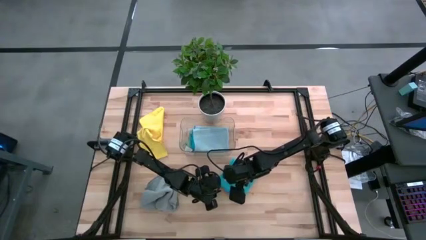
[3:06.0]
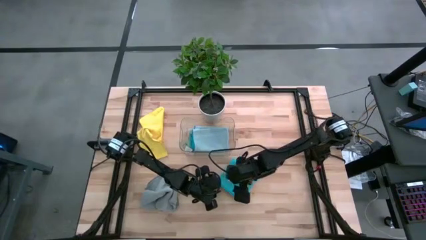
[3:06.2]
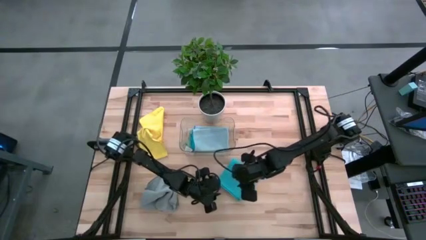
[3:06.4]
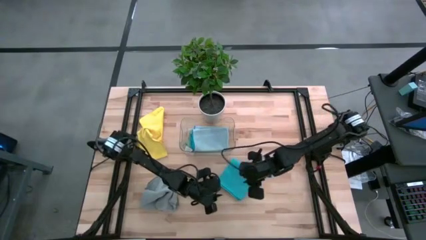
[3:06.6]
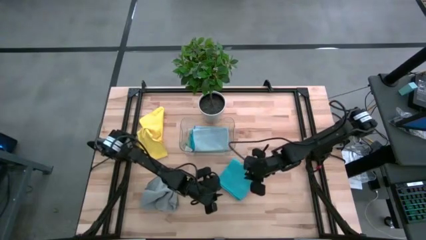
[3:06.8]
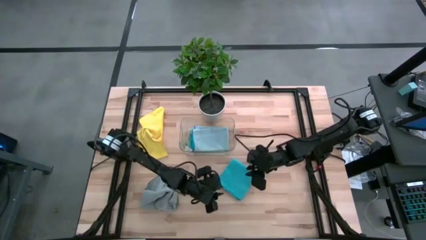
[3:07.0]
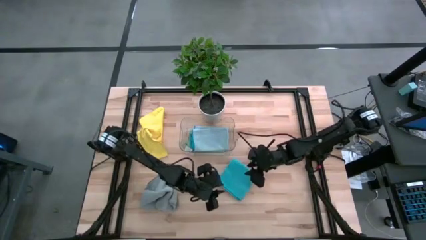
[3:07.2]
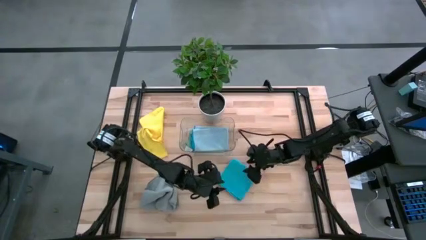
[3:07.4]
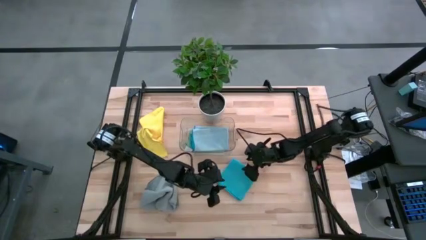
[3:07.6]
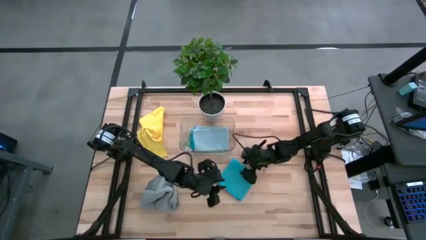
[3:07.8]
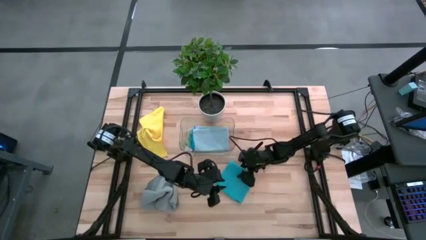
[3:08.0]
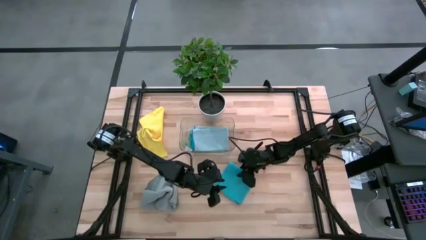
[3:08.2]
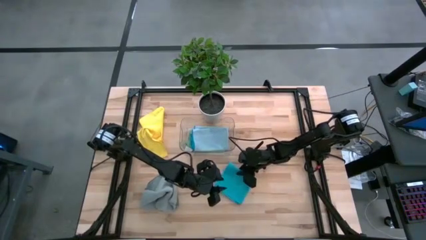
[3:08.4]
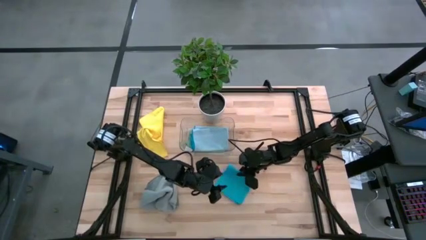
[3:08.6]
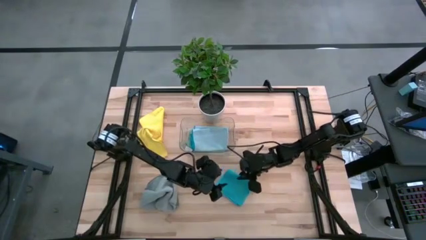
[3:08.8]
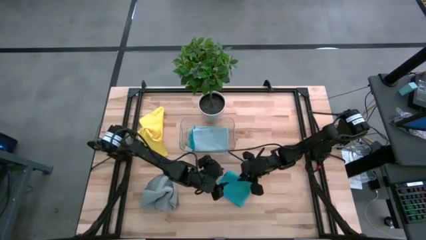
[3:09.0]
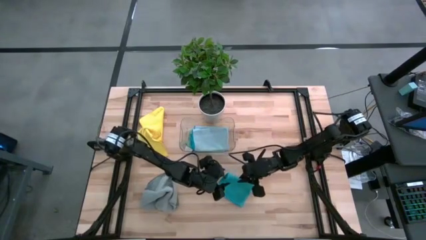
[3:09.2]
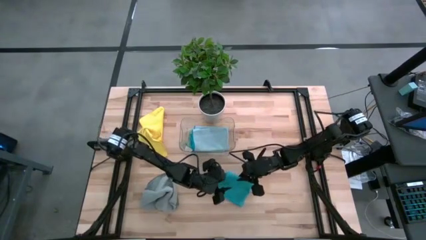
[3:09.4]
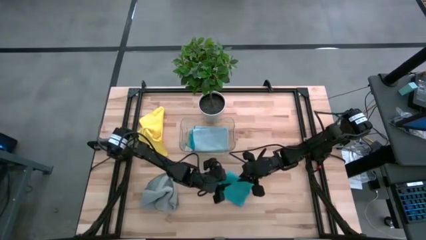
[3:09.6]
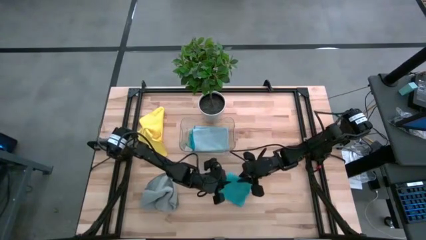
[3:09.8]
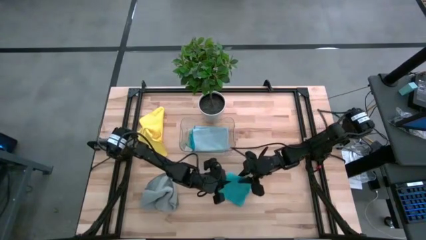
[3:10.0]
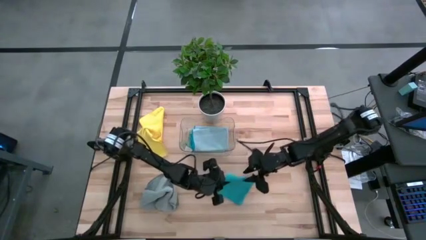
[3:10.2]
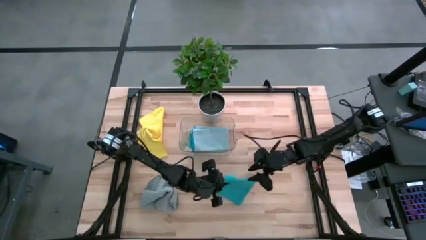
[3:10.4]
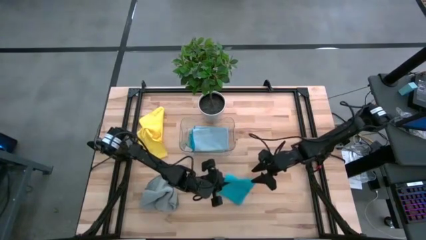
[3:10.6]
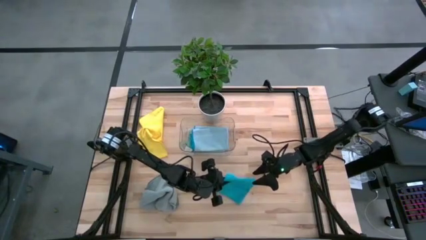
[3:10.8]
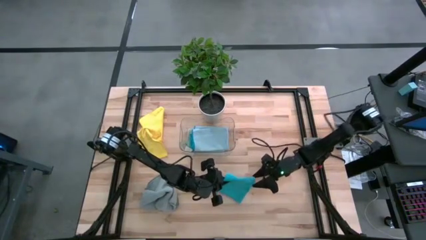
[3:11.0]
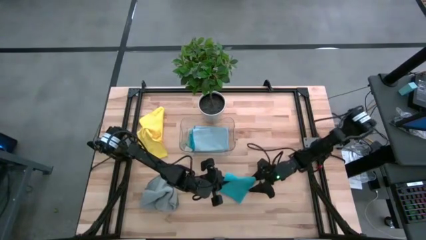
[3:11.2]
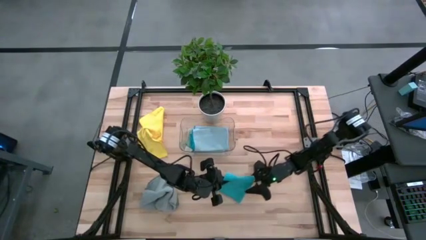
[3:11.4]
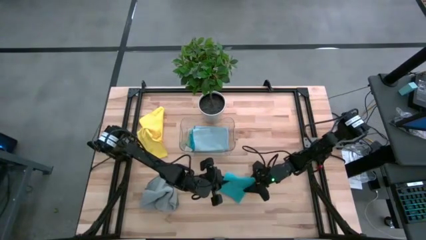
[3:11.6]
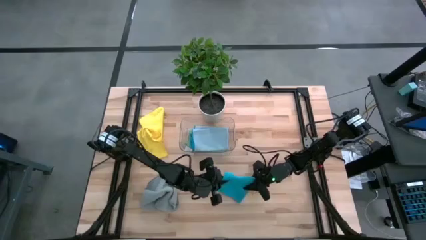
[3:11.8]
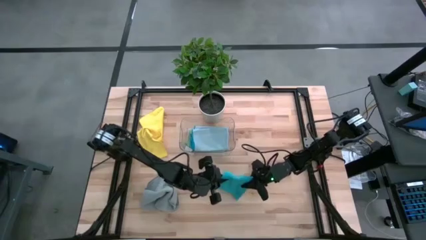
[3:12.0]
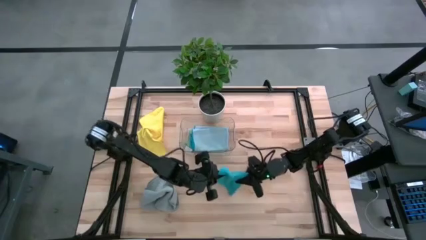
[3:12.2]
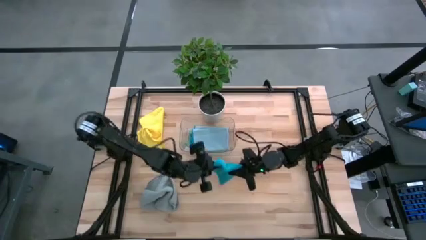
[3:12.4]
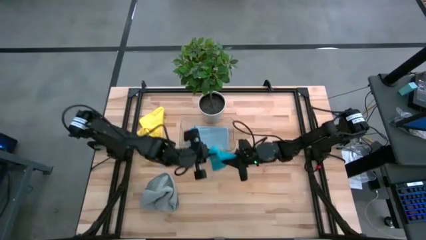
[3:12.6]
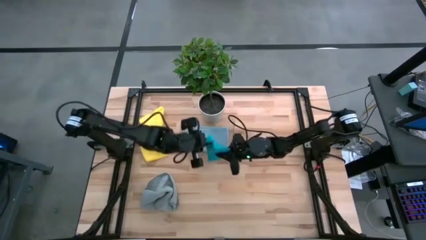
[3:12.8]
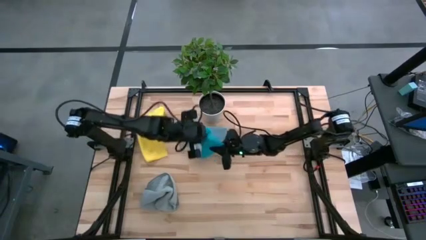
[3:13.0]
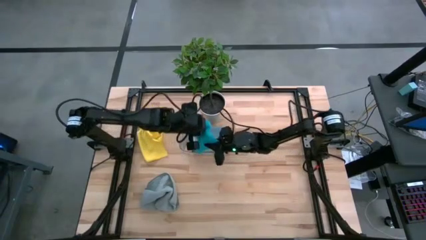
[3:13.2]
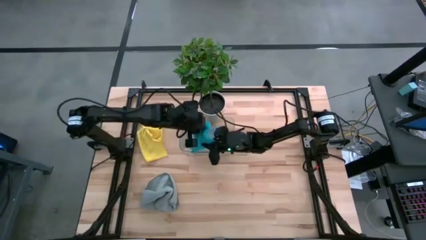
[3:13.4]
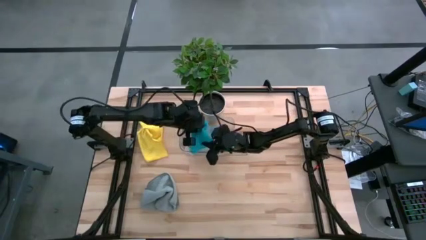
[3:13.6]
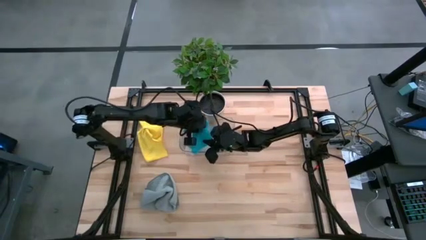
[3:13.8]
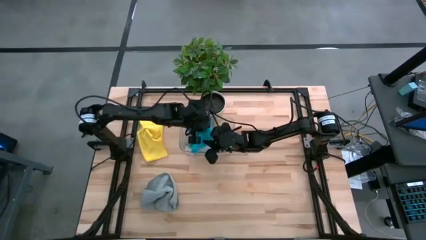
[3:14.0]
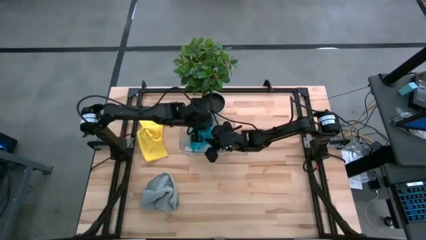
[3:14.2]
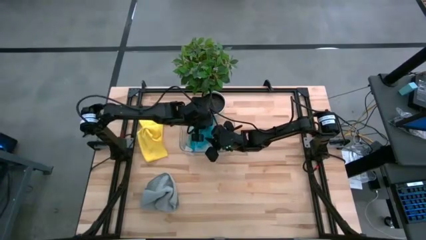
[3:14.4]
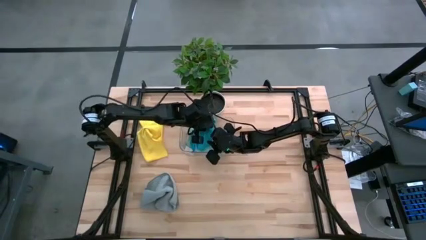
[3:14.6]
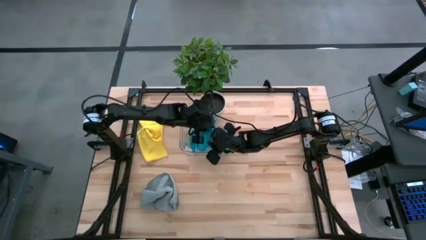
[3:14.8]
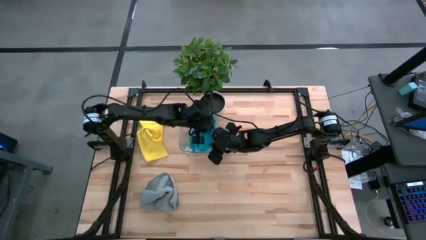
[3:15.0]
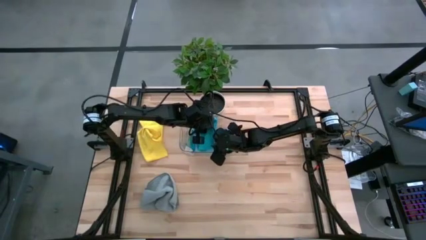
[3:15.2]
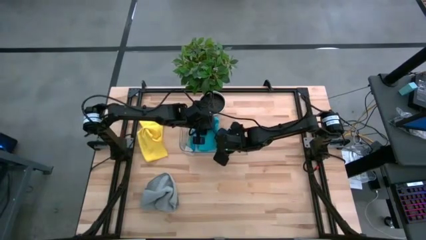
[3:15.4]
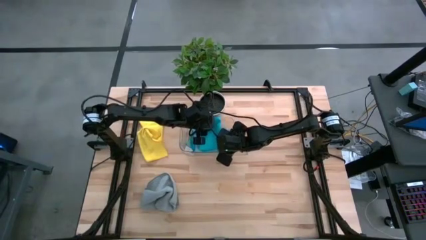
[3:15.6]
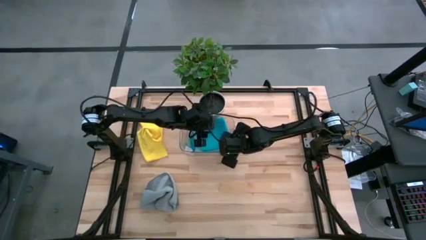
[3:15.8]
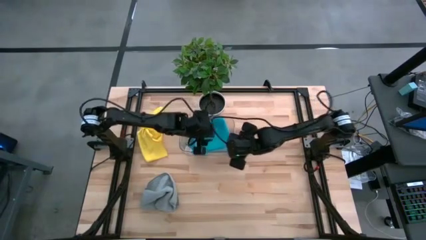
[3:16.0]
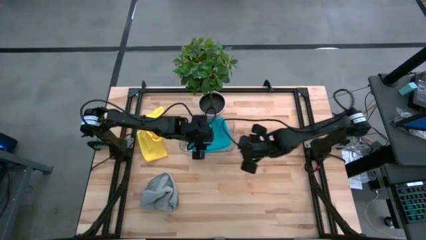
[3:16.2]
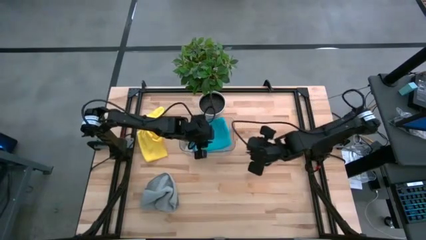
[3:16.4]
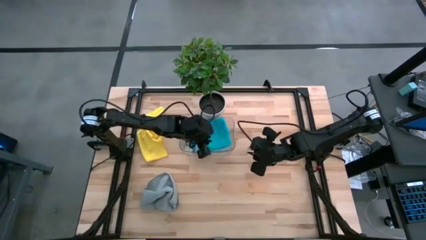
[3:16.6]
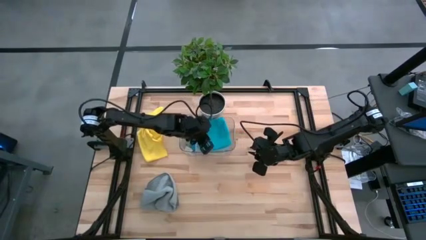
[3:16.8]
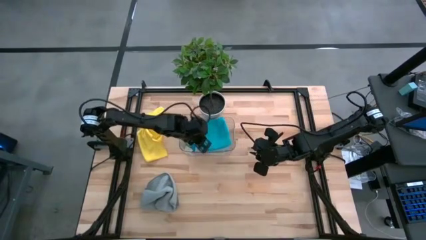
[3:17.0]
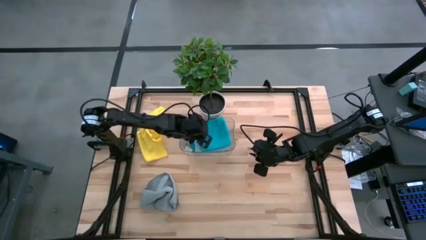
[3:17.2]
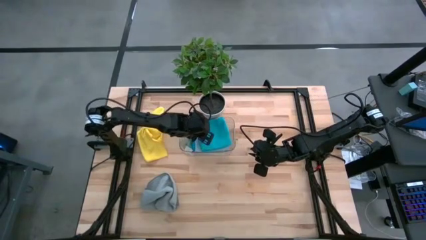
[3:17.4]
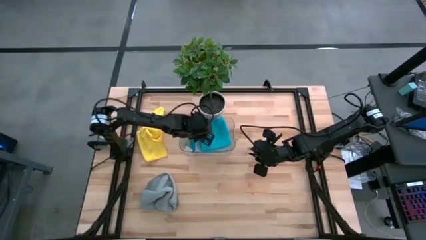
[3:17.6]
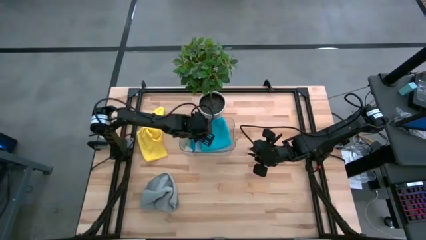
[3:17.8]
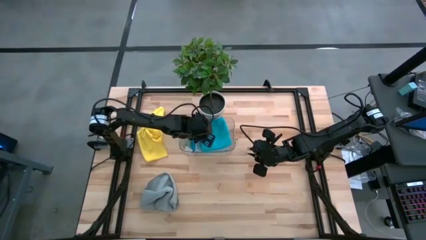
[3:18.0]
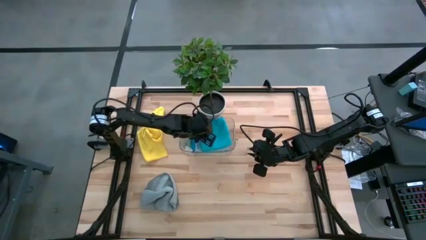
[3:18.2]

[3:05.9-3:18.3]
Task: Fold microfiber towels
Stack the folded blue microfiber cloth on top of the folded light blue microfiber cloth
